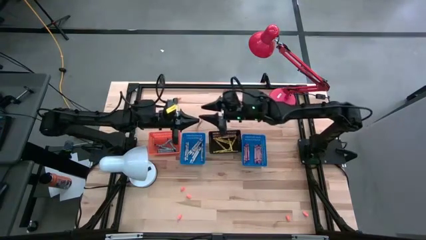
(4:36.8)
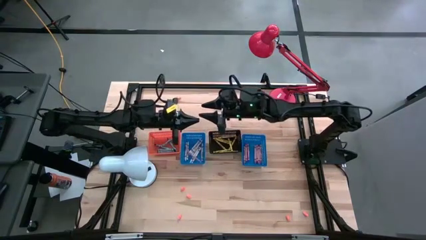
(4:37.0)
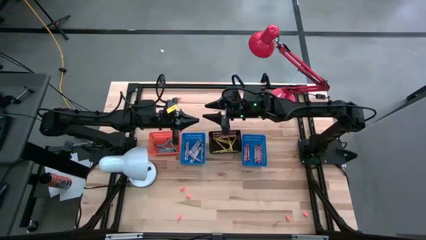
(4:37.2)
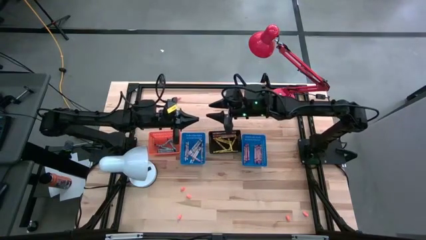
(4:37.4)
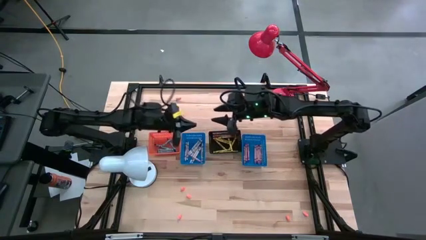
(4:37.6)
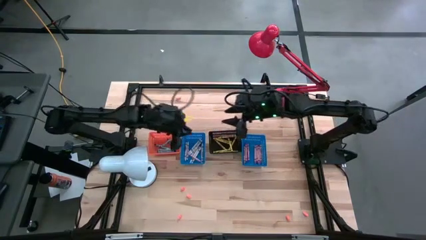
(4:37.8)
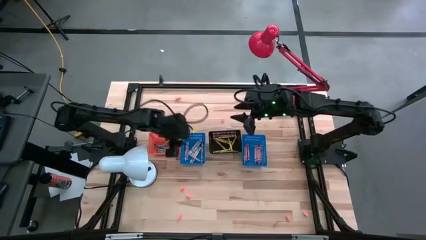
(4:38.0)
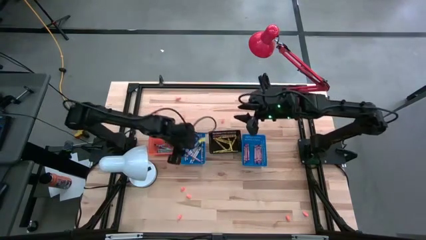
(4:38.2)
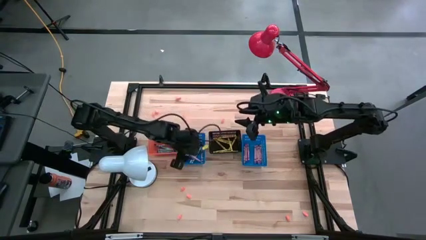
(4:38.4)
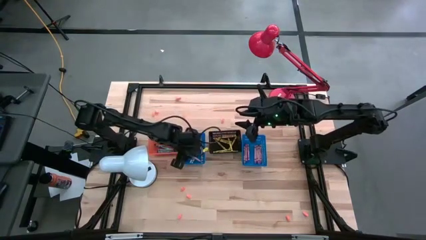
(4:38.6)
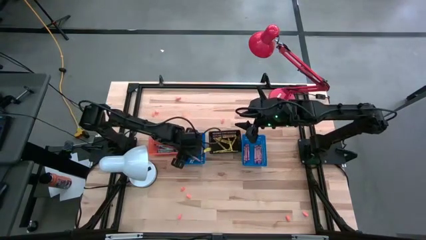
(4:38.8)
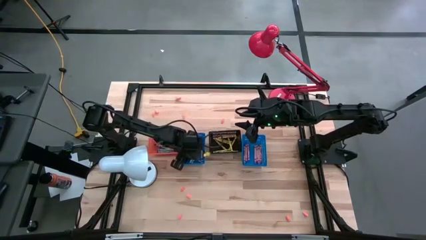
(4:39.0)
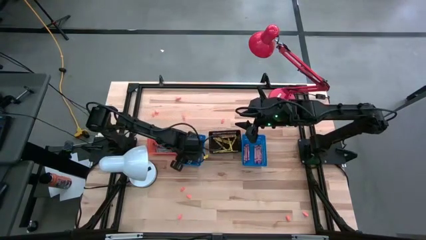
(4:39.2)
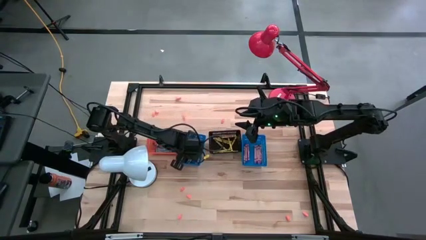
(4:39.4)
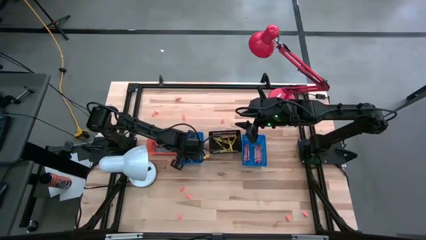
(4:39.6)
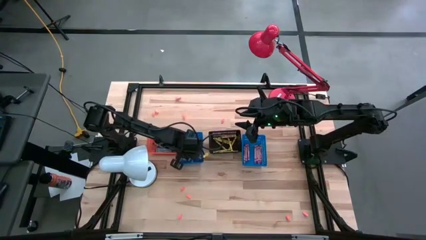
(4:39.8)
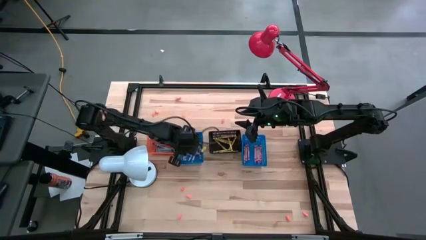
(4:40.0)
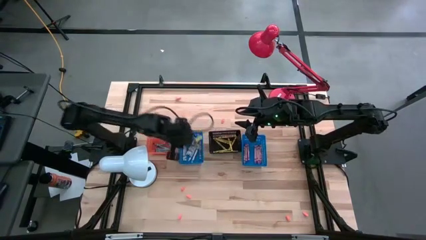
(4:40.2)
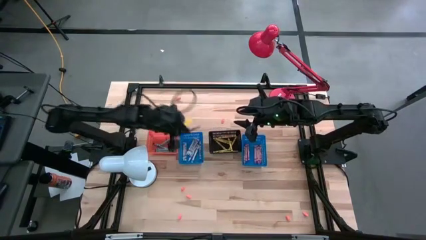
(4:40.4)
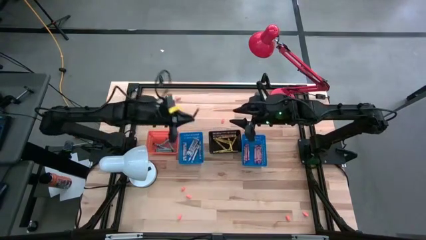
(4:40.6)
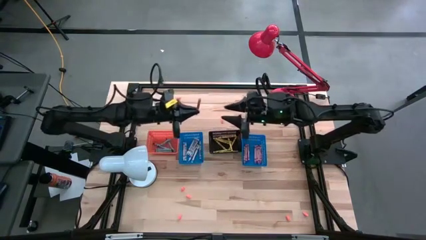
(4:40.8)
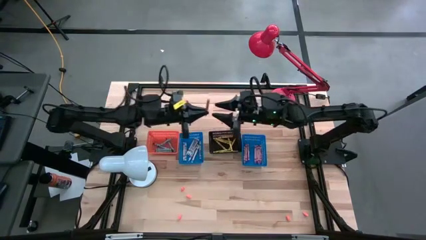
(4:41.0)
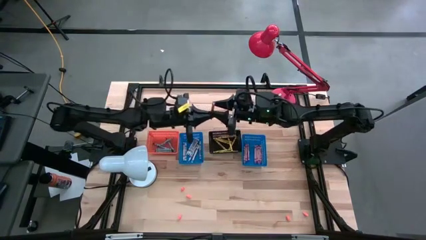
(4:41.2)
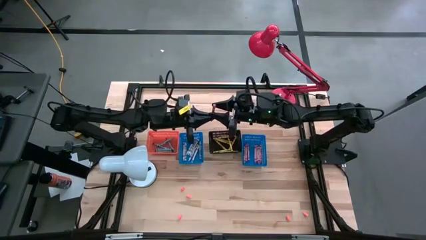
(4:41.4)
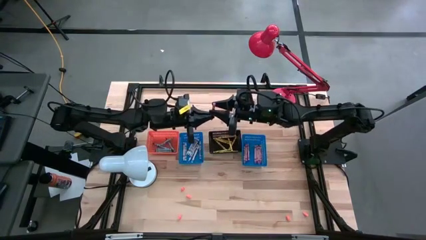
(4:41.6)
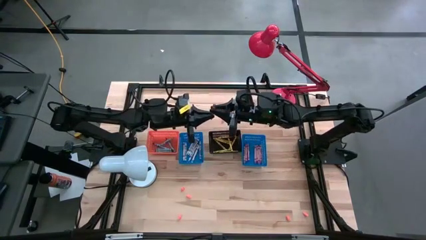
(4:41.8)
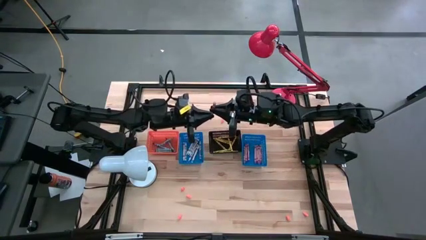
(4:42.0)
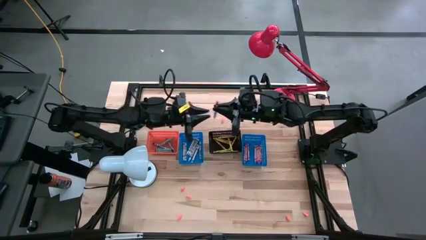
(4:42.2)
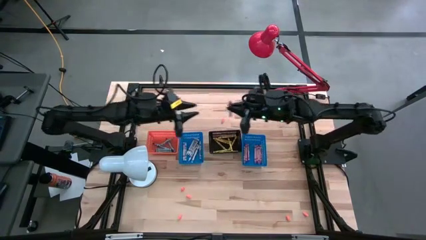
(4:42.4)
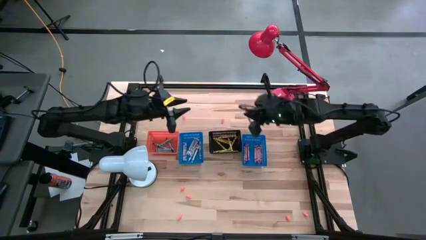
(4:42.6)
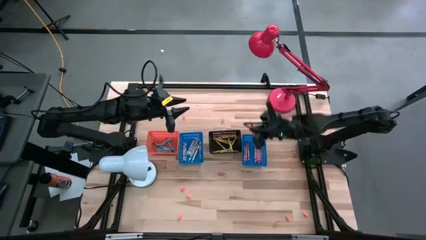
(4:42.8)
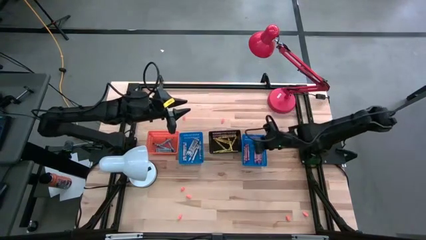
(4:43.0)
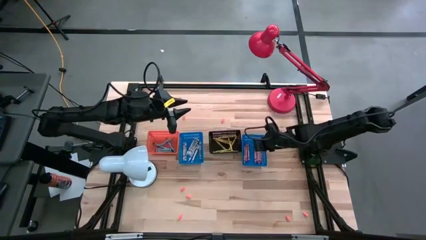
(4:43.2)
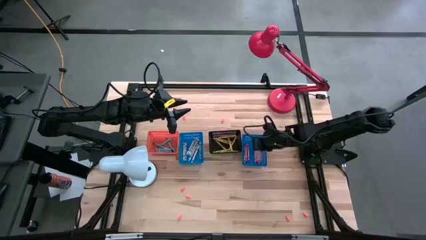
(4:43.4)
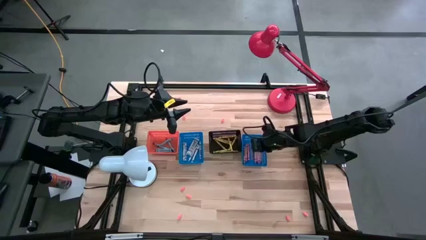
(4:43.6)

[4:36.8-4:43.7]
Task: Sort crayons
Put the pink crayon from the left blue bin into the right blue bin

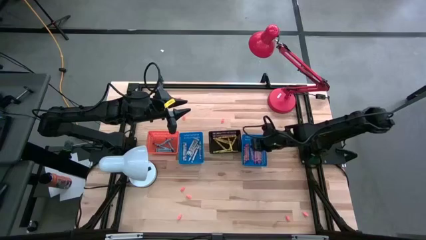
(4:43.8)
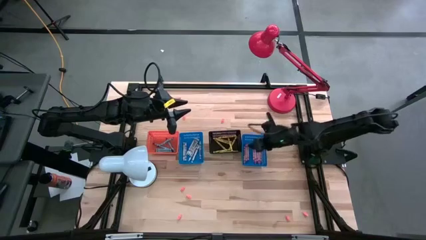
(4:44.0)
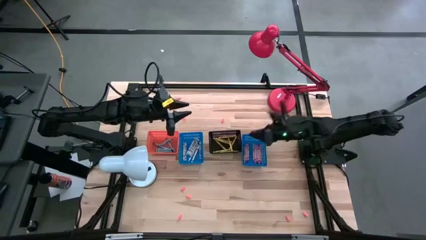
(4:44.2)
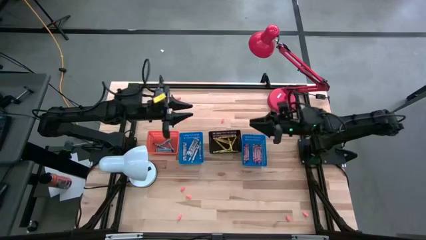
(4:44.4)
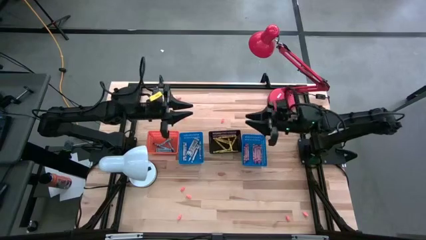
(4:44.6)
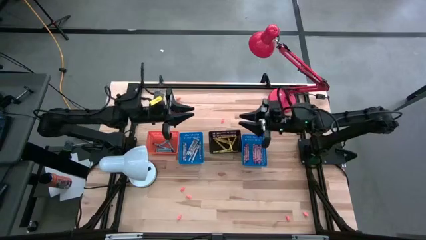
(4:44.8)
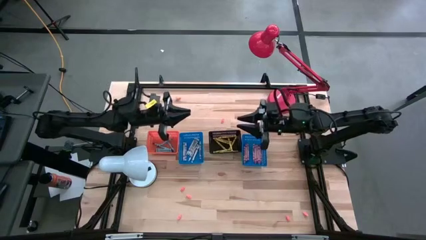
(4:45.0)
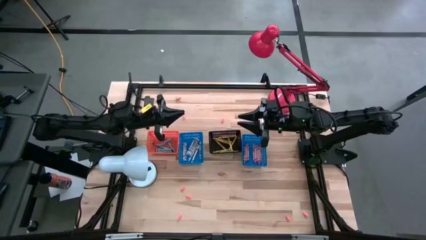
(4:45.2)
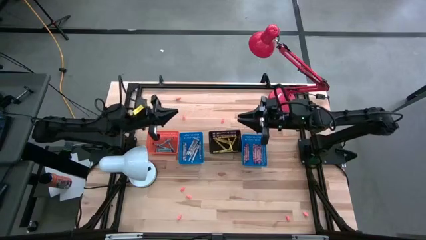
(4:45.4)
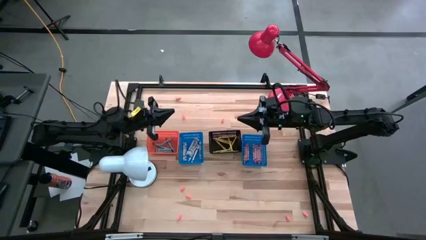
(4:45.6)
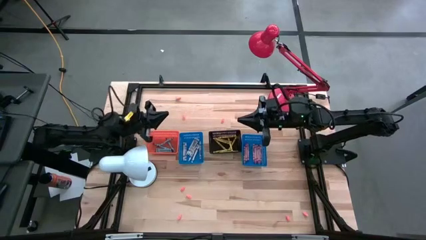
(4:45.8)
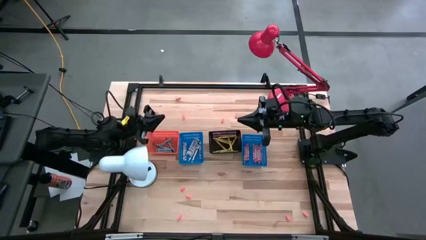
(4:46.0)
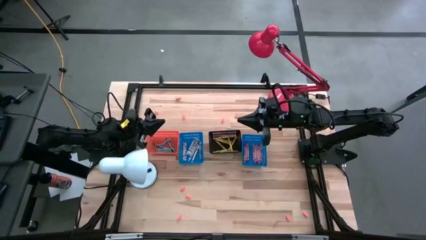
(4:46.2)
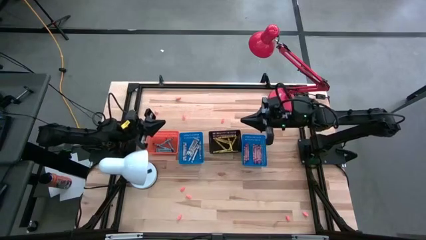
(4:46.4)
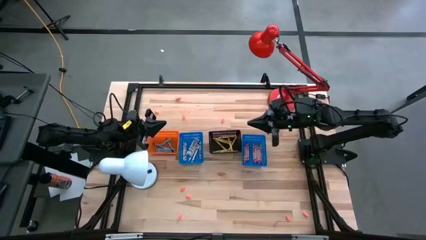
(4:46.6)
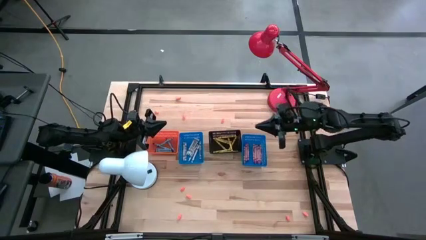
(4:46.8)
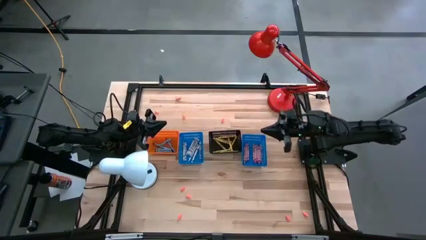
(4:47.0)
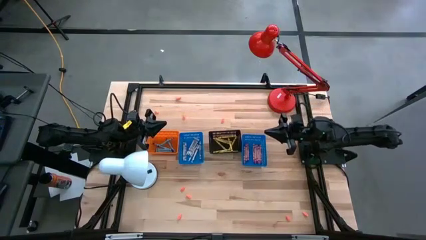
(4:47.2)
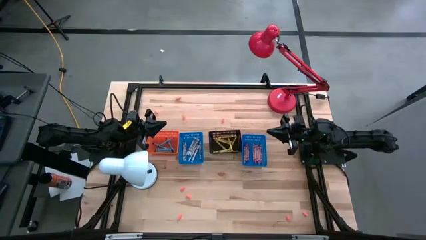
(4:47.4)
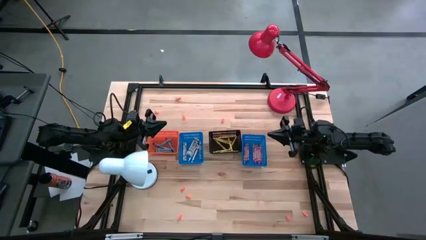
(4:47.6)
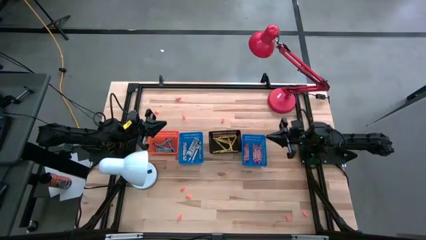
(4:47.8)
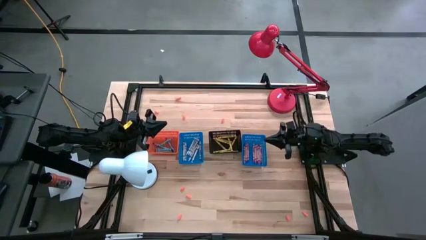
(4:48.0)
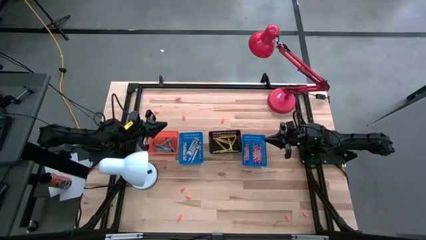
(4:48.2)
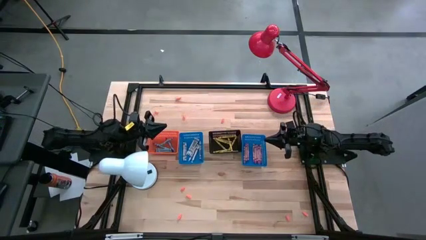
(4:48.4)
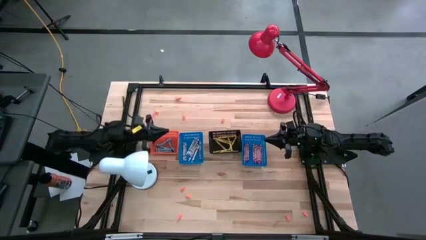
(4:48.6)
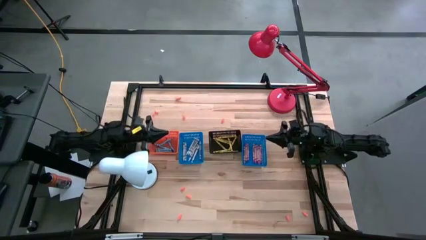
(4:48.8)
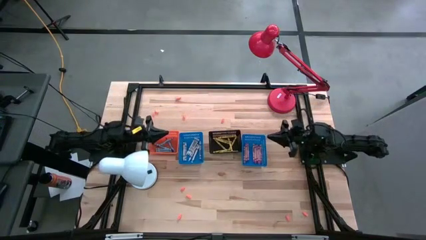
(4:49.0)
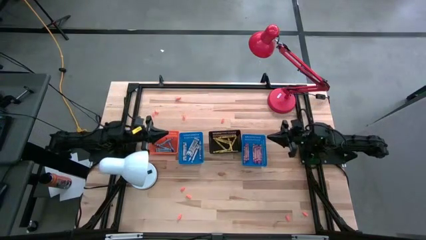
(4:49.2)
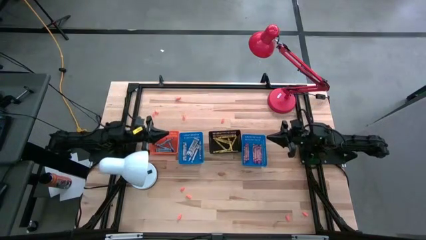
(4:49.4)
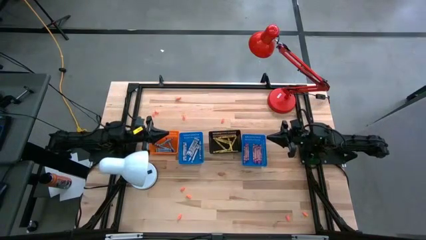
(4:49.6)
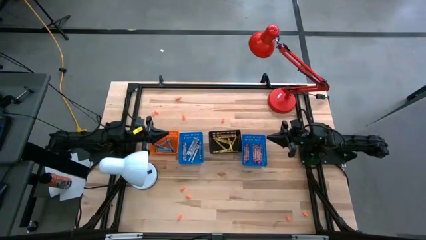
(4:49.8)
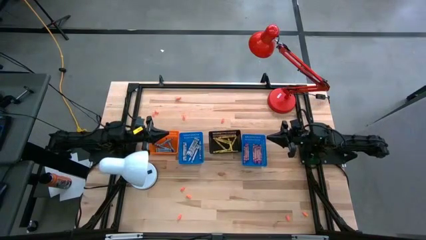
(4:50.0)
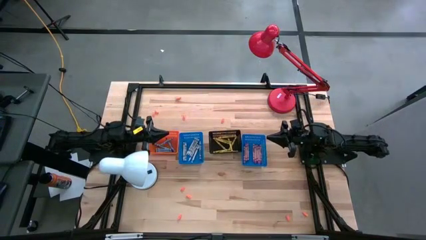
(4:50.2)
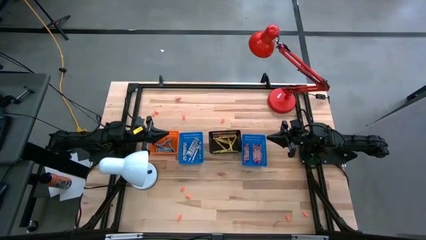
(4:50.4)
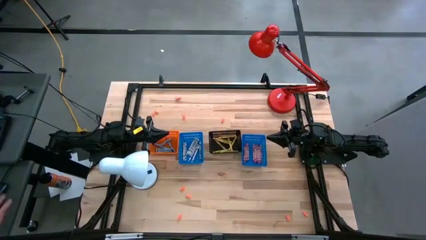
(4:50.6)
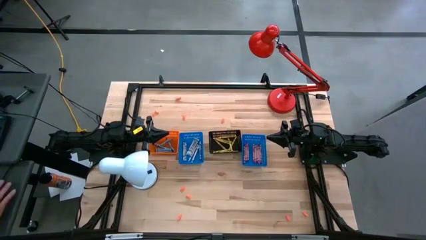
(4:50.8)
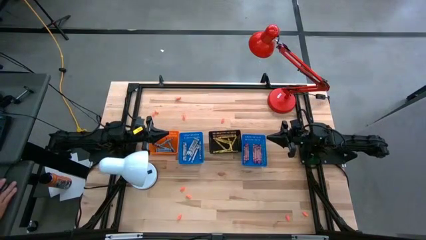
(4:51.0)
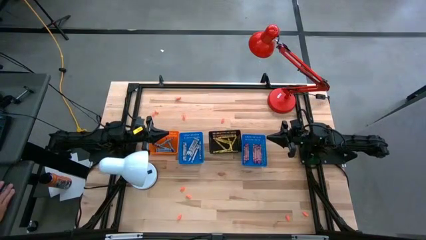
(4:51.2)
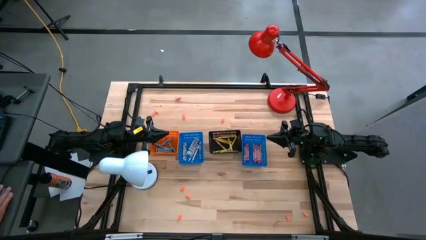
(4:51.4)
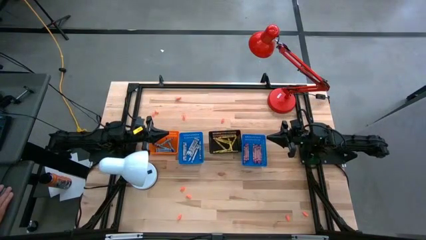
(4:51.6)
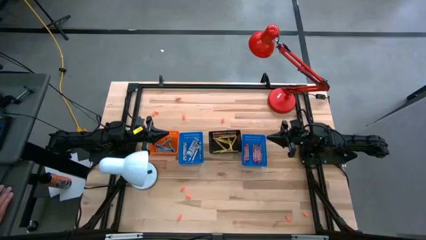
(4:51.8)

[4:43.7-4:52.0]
Return to Home Position
